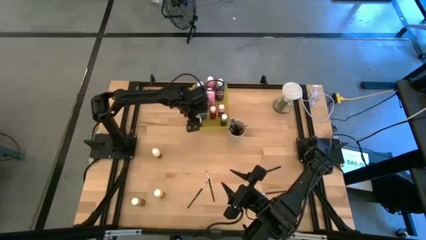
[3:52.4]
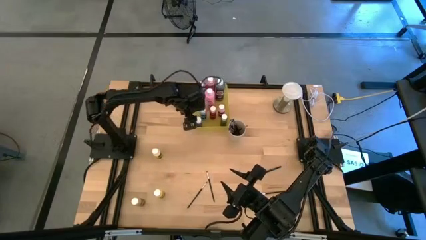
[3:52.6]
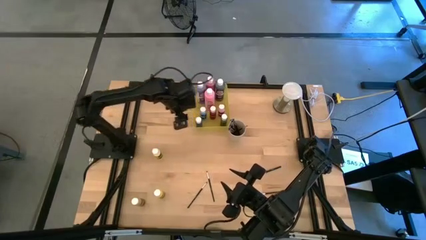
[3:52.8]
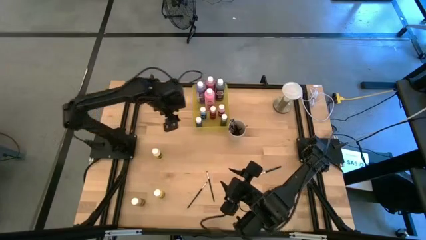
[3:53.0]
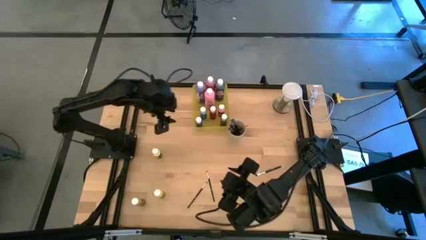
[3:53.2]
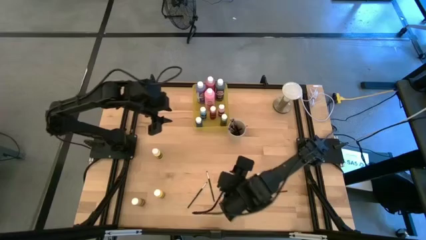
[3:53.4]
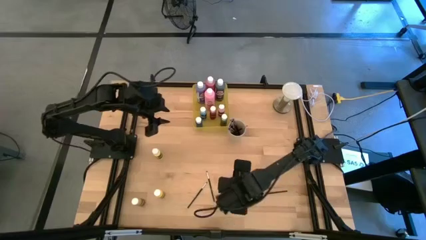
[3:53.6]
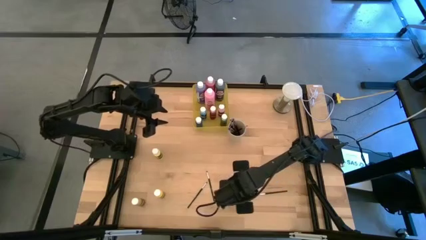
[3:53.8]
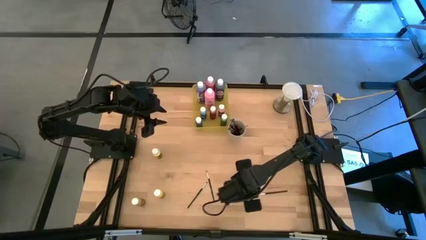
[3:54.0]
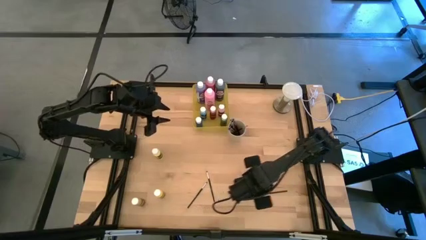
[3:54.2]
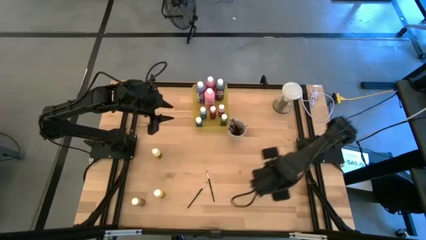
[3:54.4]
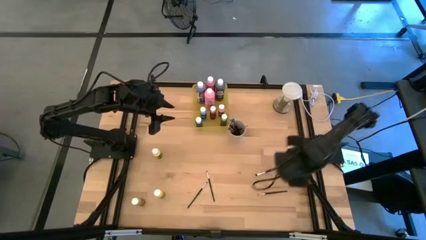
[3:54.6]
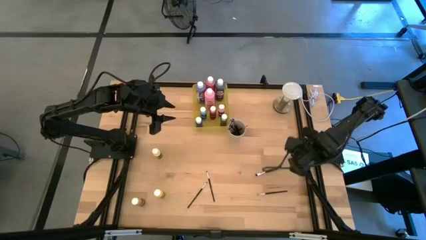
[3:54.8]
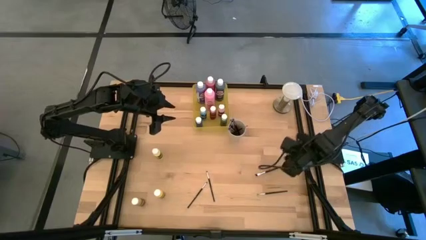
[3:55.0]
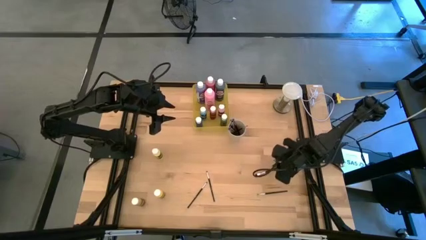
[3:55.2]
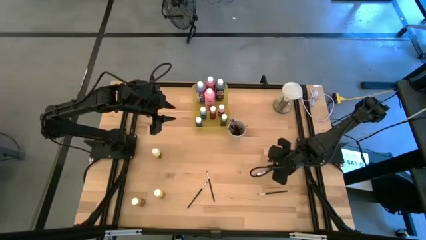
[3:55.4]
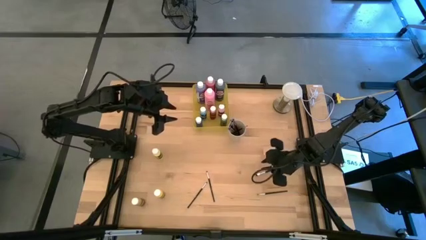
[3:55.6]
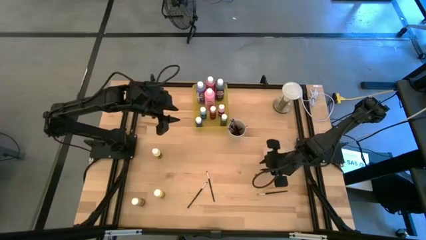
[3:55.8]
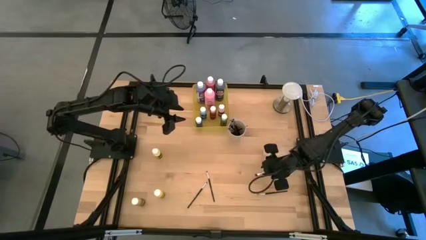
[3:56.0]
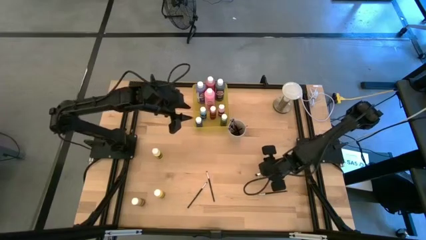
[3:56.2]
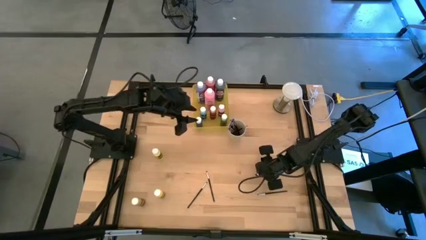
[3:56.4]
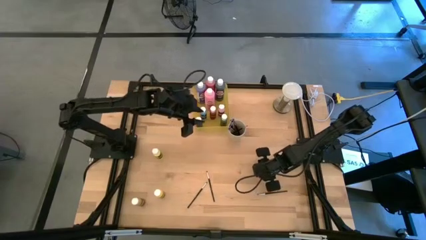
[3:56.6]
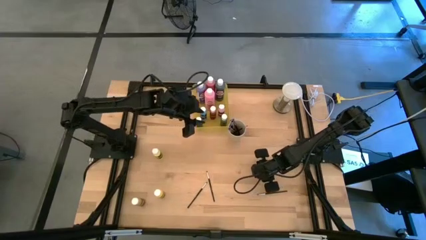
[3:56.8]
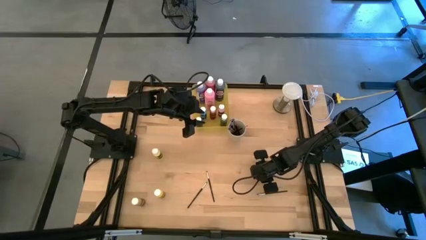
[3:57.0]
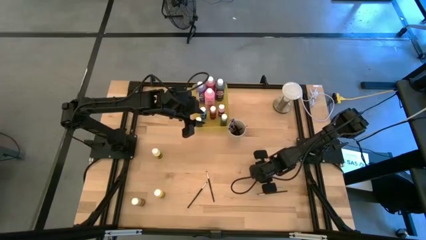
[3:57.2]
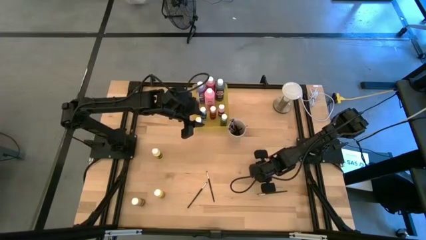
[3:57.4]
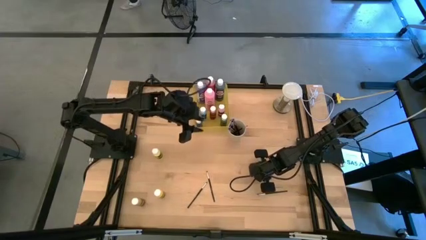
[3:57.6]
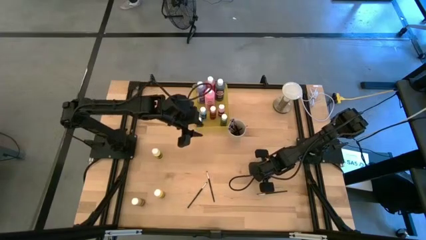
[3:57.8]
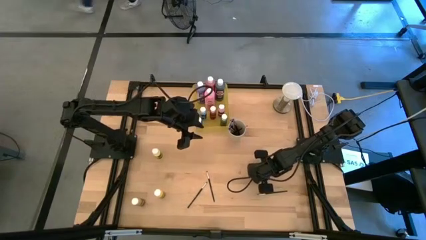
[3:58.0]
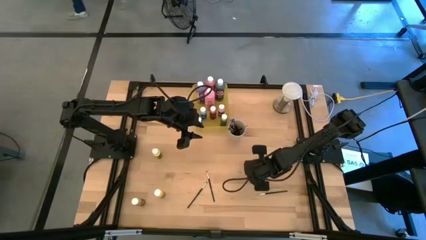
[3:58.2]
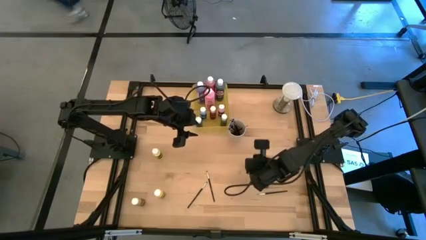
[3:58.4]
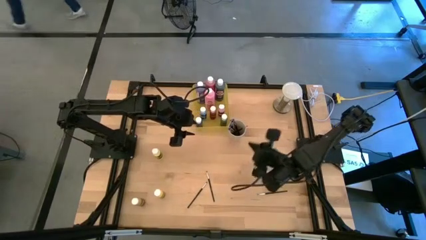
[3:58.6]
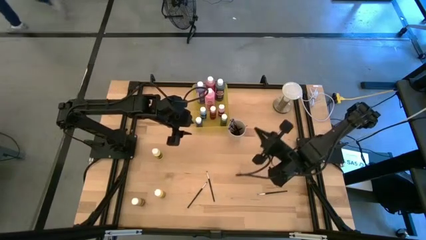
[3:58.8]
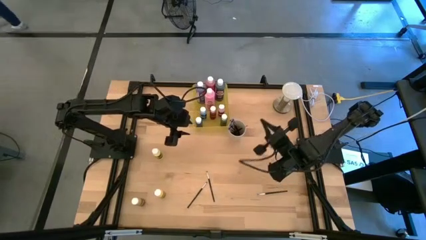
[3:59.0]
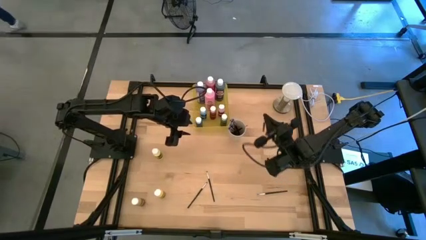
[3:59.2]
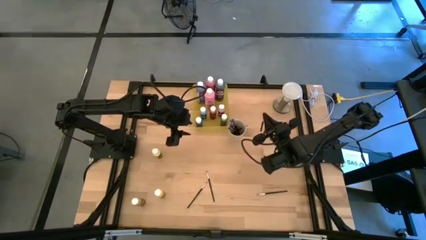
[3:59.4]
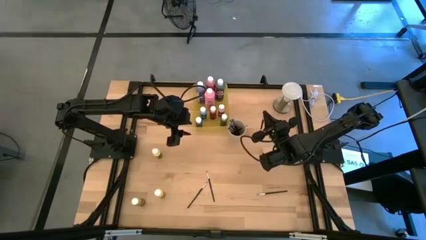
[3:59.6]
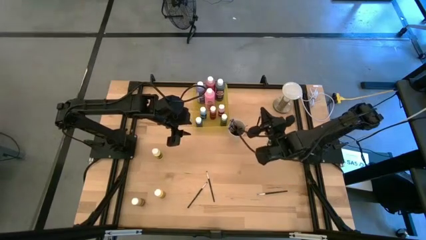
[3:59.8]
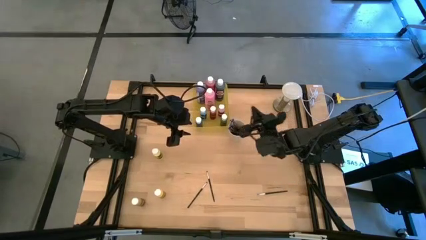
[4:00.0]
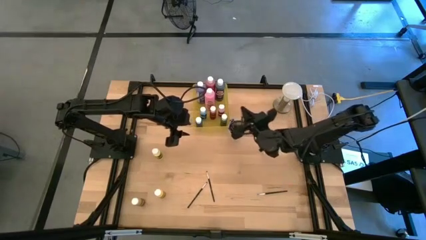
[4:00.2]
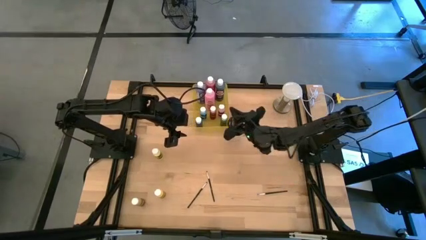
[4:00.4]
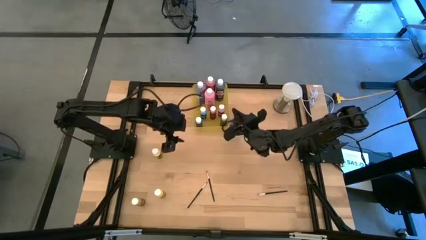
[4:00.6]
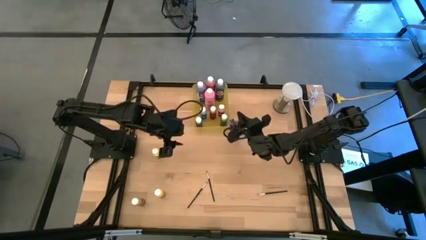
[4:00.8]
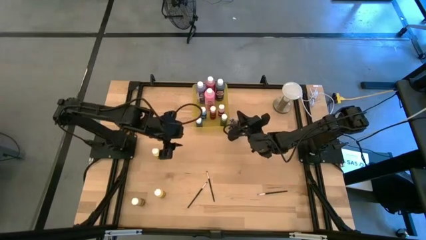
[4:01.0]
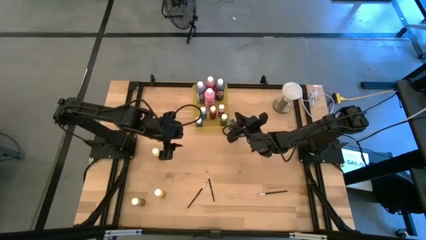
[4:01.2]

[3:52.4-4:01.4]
Task: Pick & Place Paint Supplies
Put the black paintbrush into the white cup

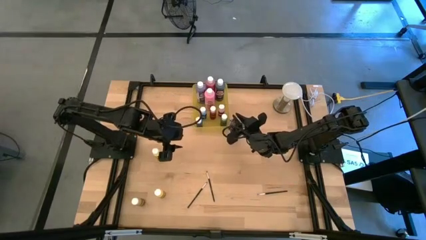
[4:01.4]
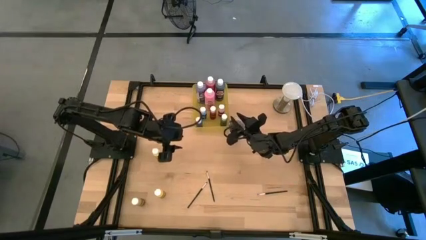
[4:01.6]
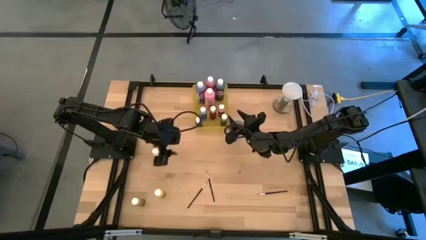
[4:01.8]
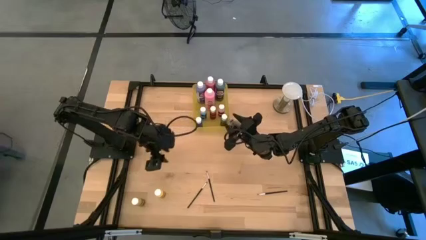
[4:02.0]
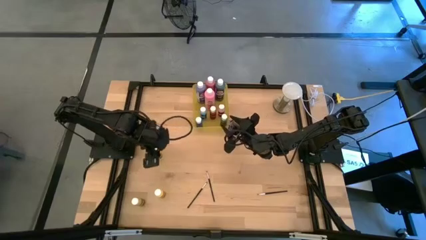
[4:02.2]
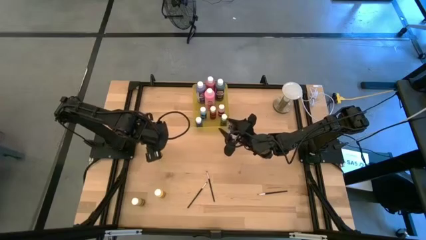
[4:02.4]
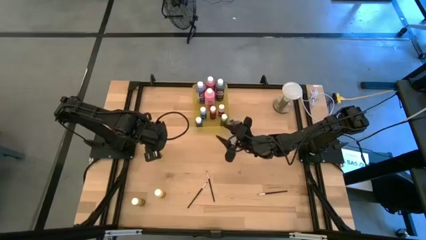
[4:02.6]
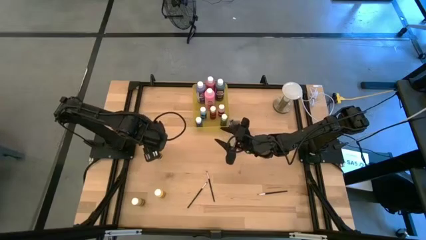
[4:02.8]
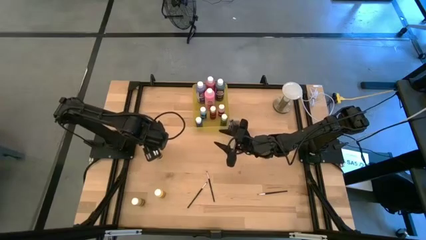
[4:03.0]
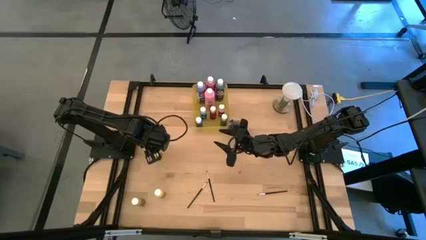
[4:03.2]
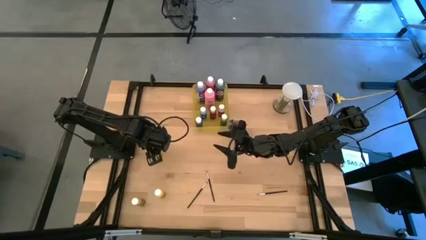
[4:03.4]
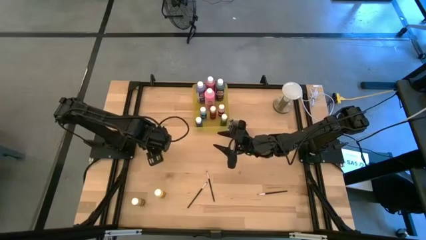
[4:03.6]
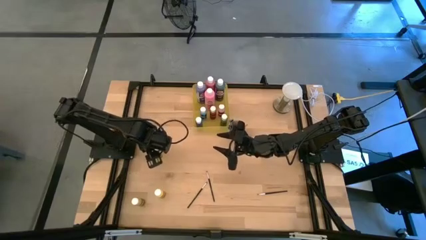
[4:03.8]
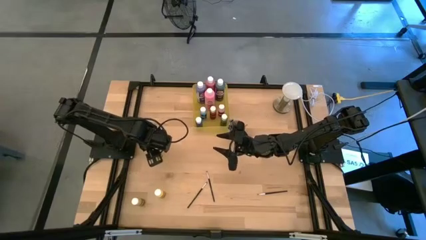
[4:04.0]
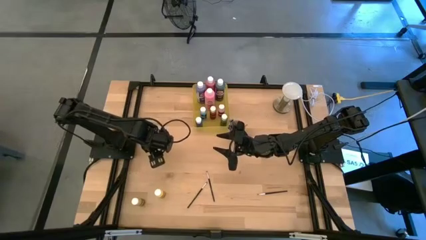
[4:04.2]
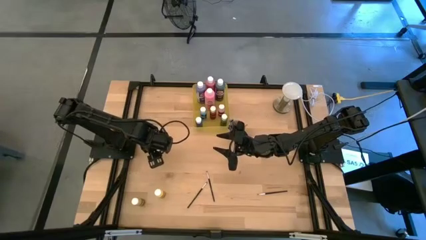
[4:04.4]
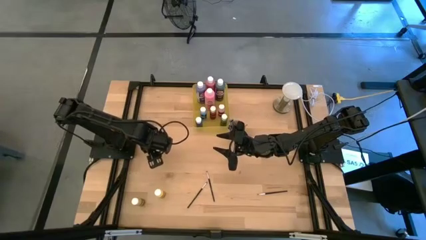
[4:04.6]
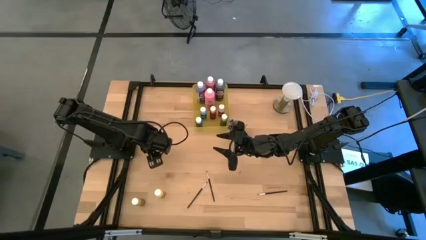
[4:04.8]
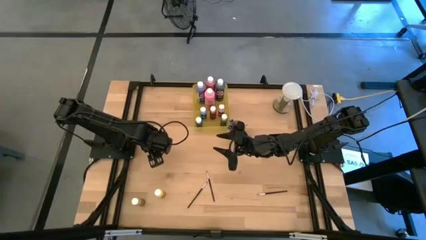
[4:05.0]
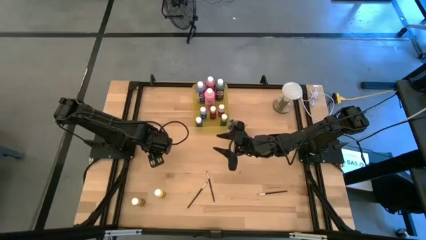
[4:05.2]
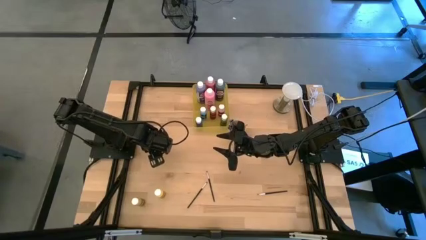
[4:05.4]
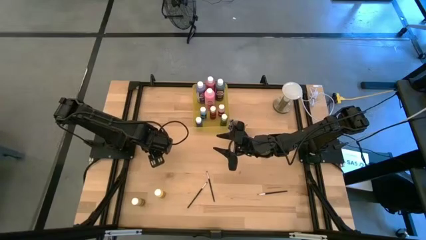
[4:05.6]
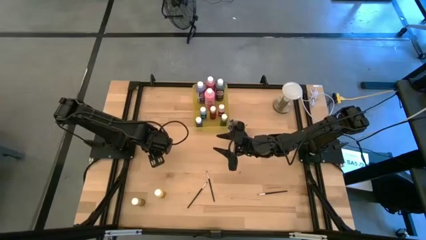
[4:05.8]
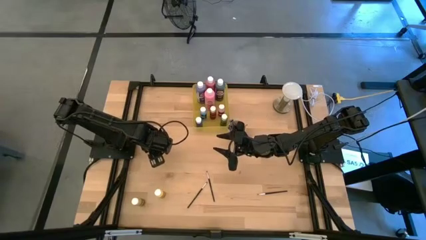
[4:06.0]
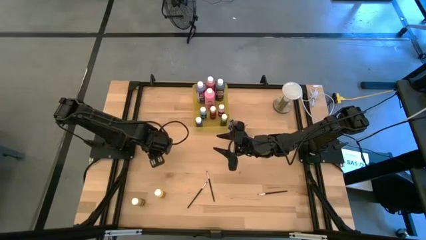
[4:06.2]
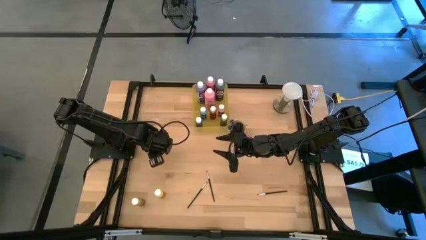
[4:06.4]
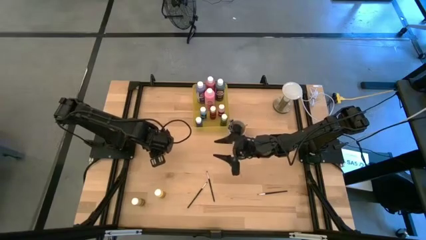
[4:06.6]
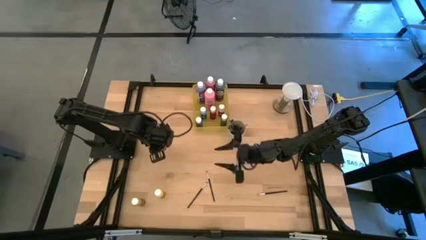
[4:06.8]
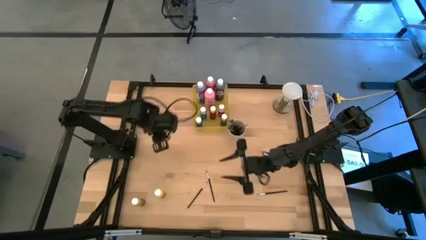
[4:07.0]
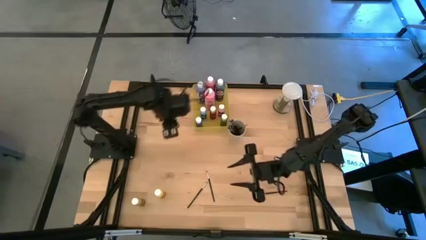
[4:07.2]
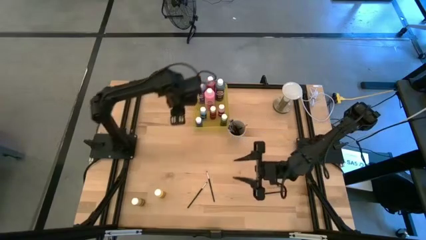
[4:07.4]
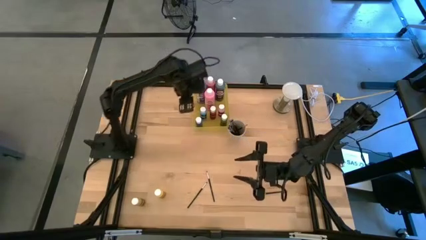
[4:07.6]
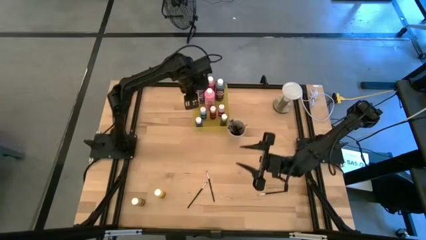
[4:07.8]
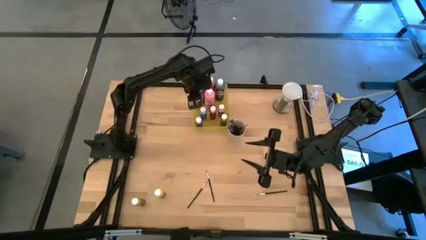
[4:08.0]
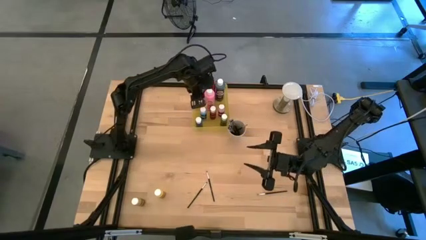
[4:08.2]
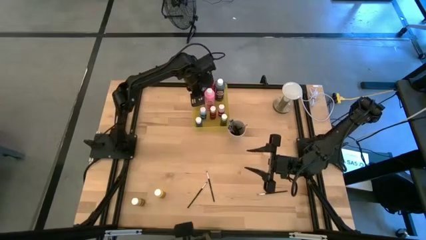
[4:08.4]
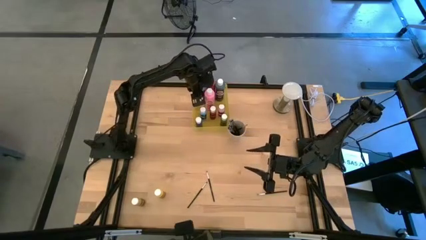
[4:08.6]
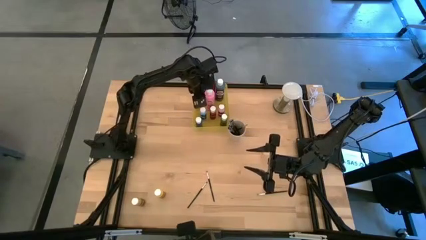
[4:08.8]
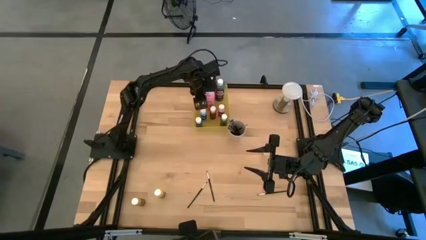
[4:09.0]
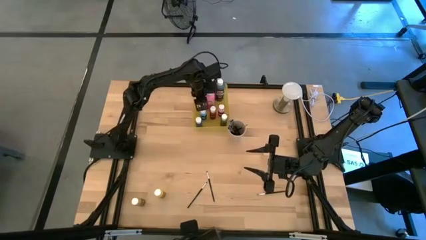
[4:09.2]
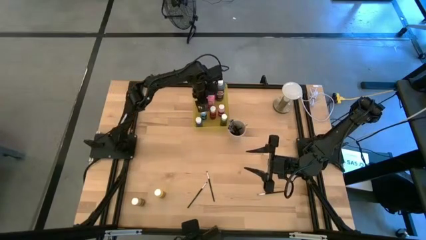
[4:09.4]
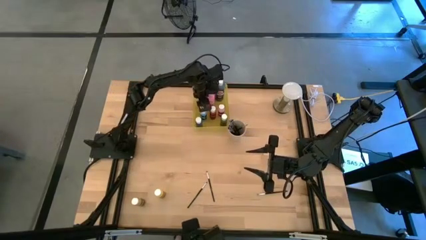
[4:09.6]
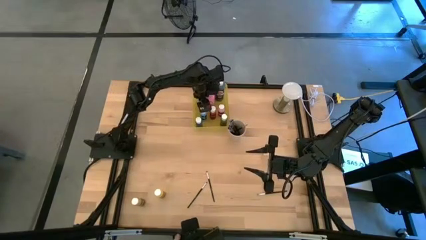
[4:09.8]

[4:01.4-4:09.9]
Put the small light yellow paint bottle into the yellow bin
